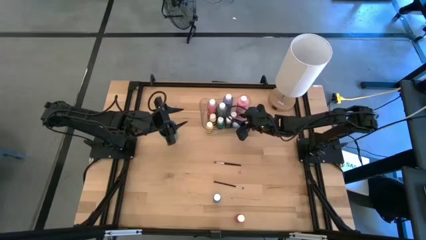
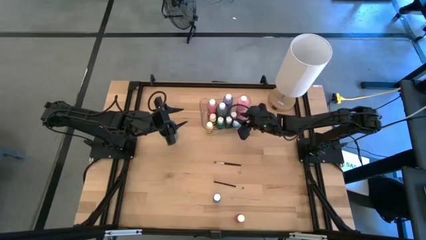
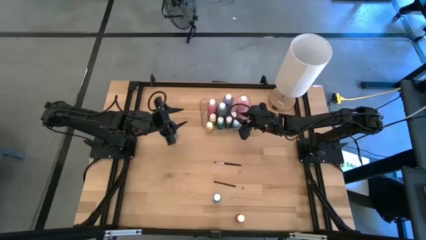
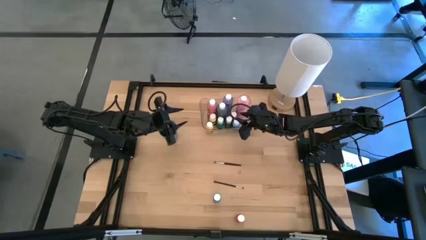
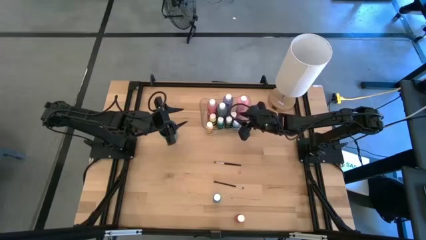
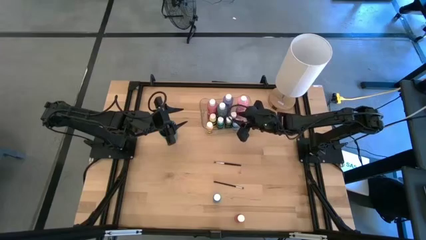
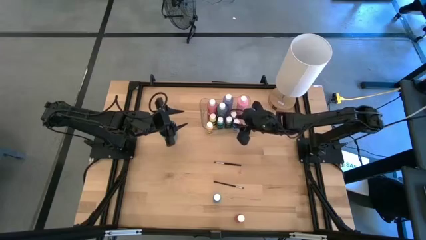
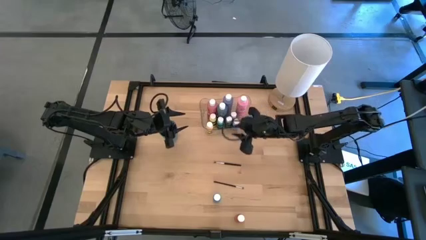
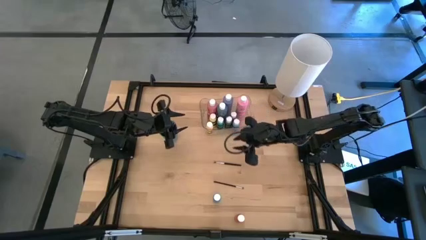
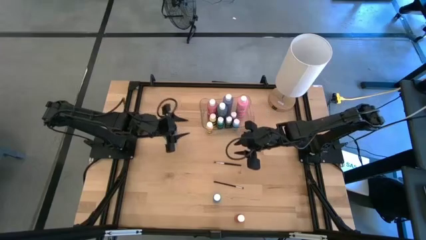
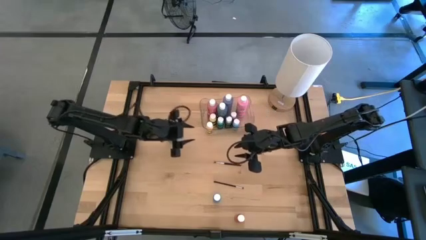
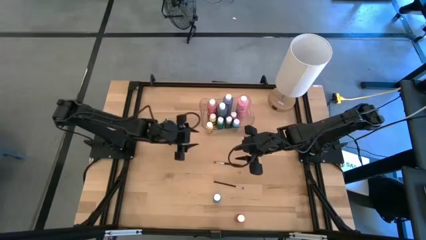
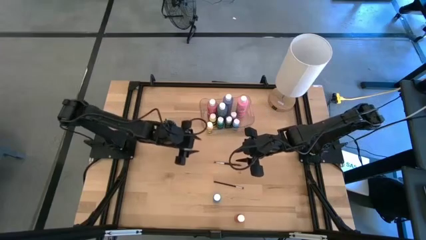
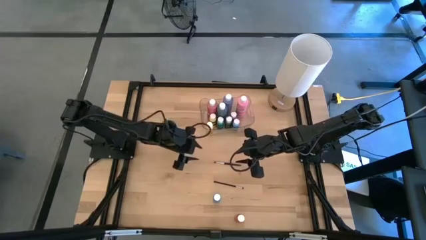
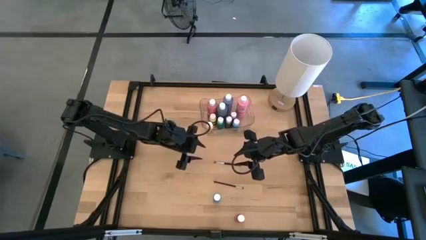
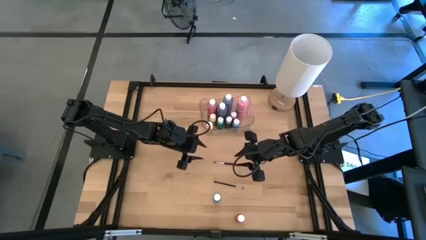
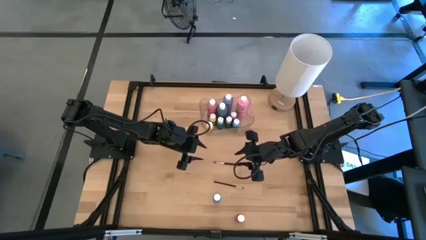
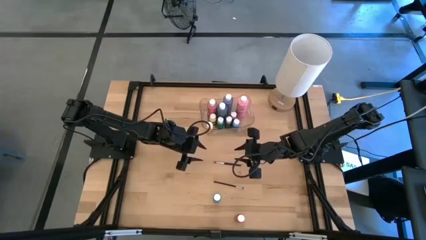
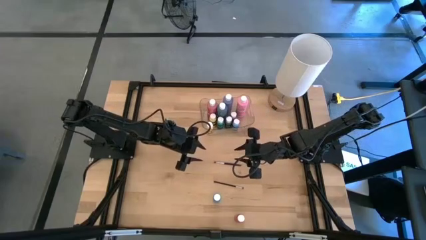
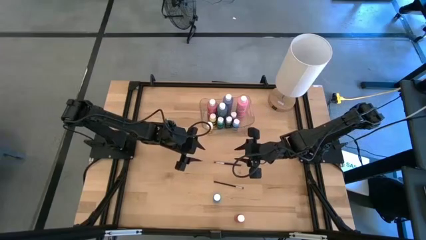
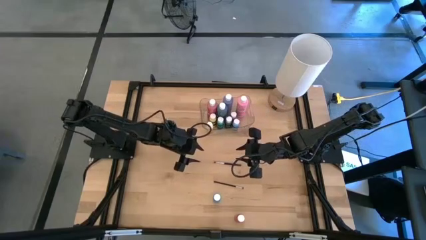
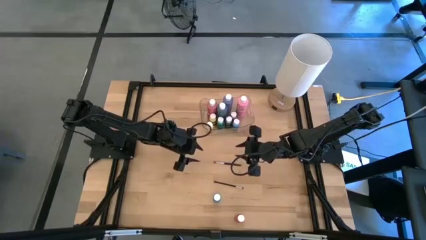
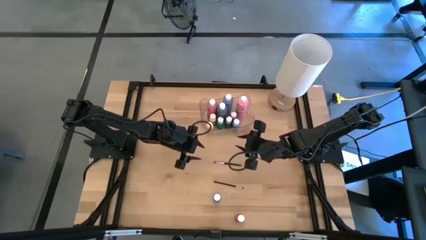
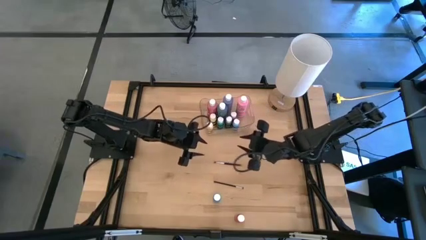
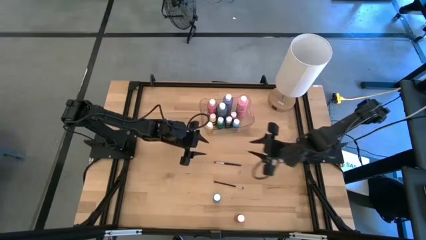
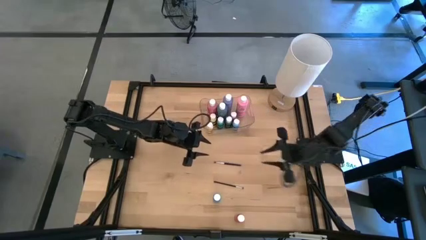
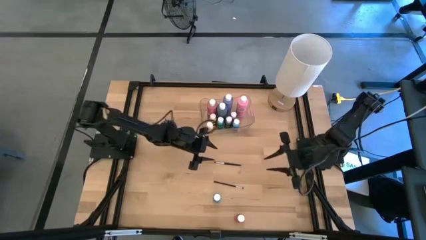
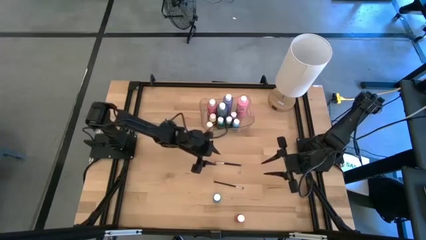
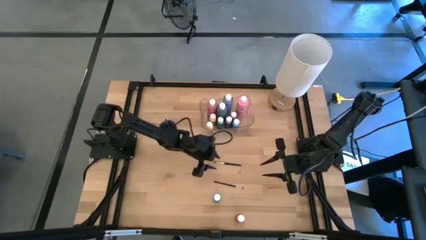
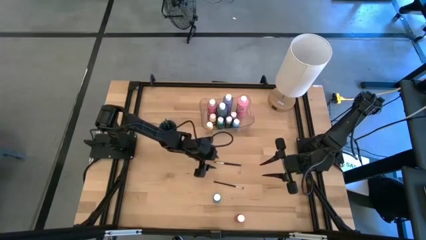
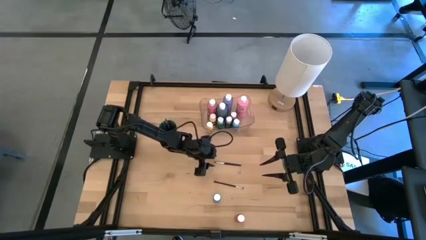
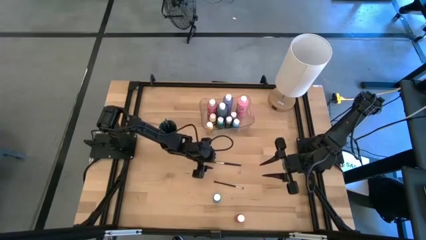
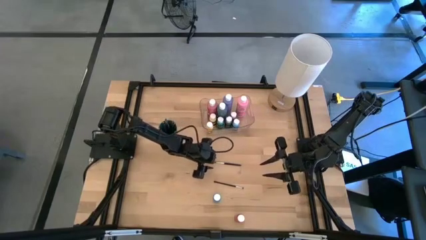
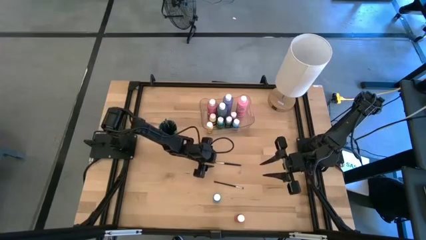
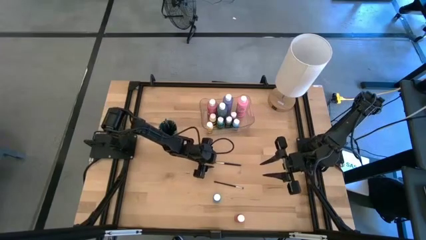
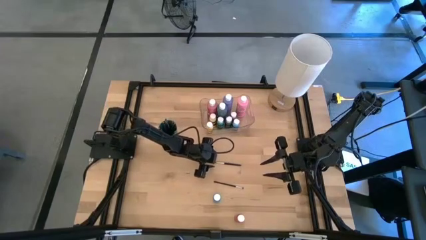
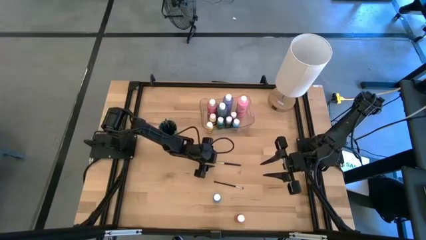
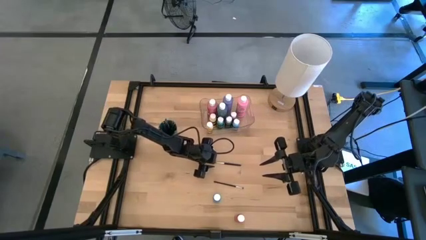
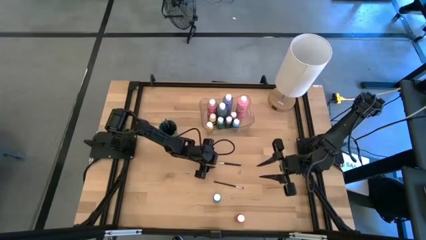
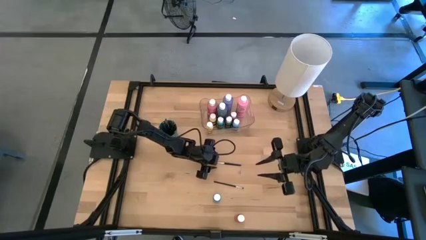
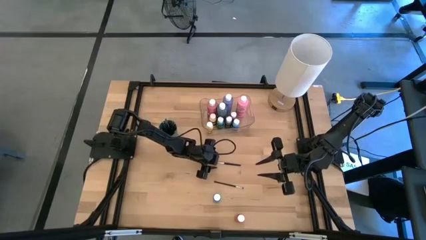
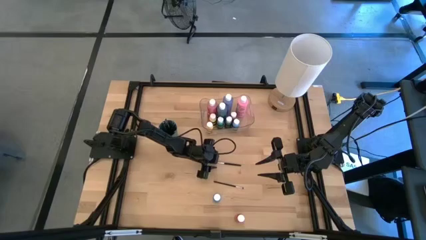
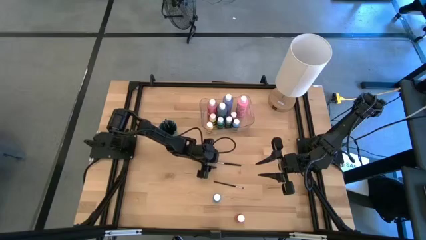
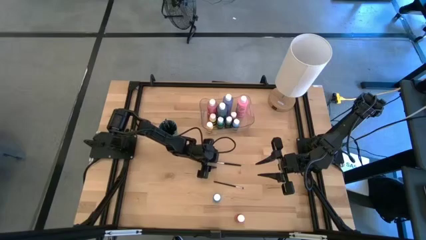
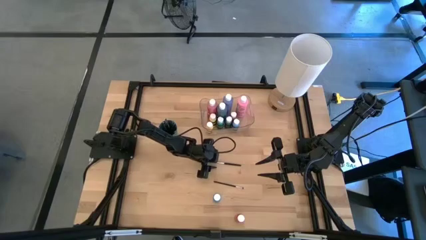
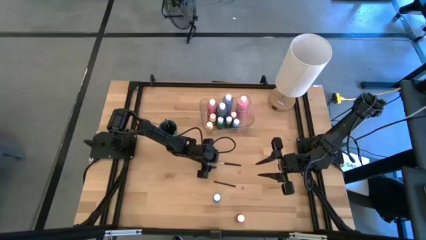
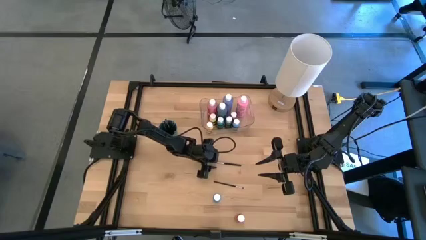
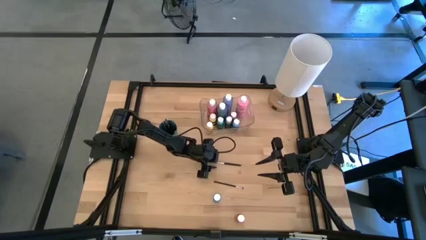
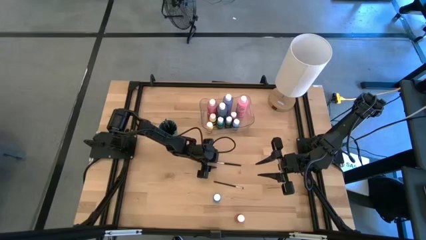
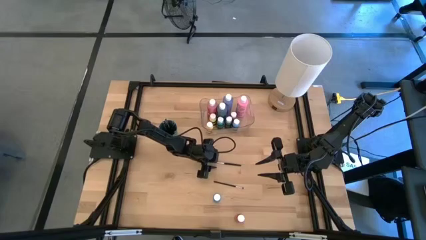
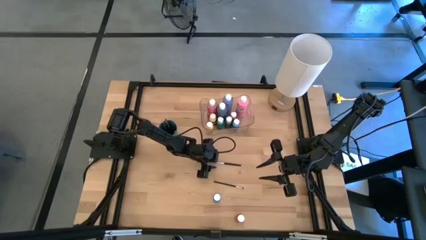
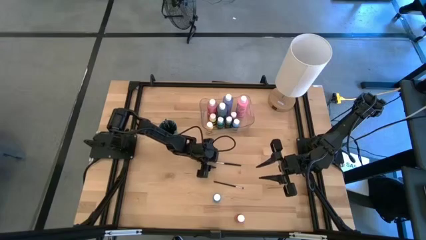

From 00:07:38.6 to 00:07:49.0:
Task: Pick & Place Paint Supplies
Put the black paint brush into the green cup

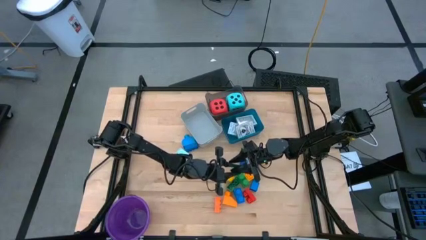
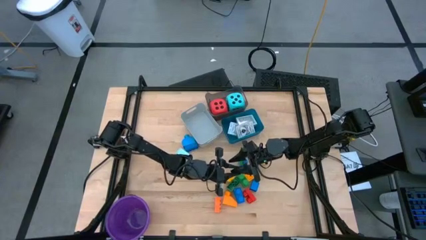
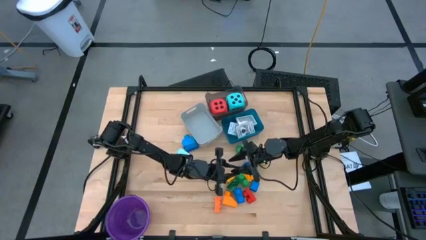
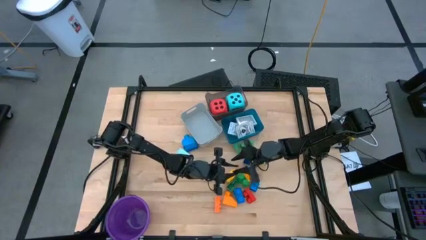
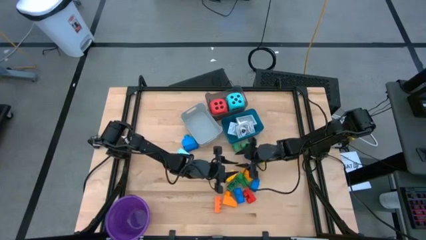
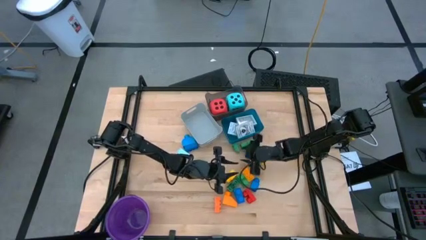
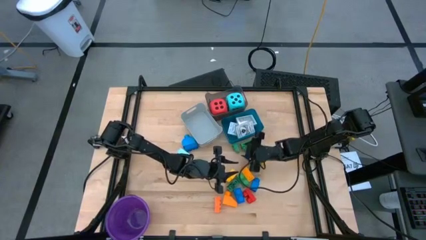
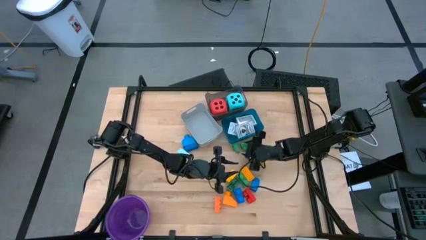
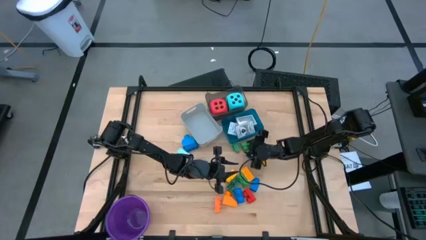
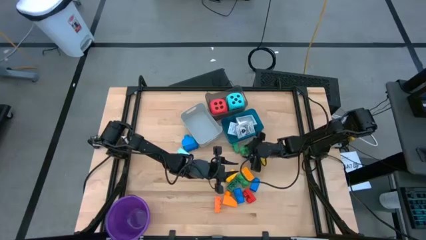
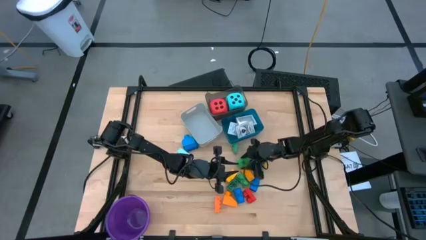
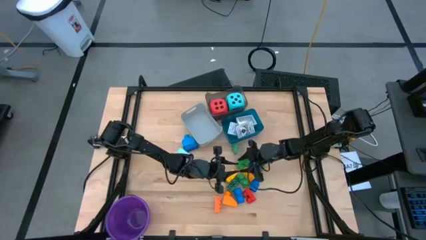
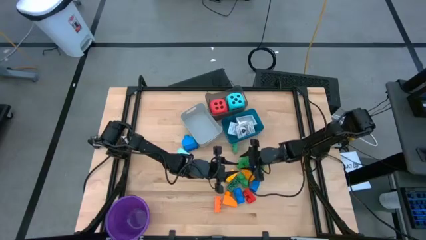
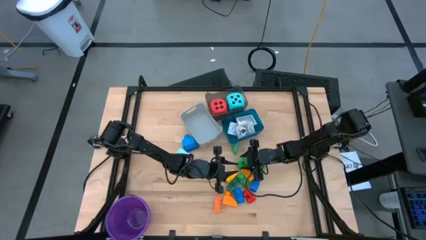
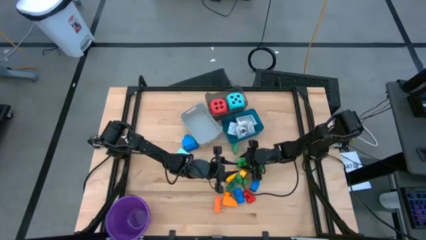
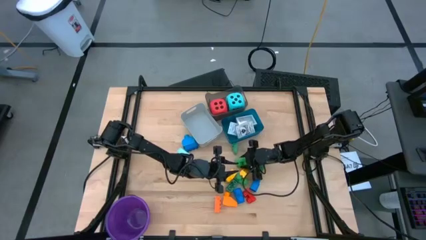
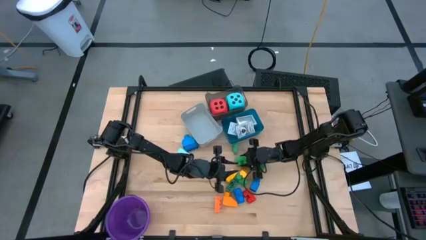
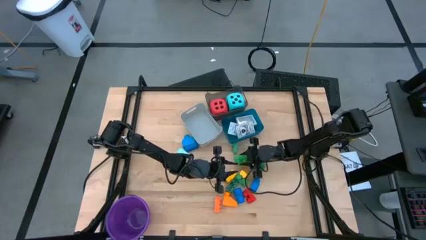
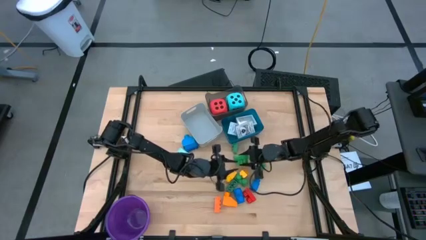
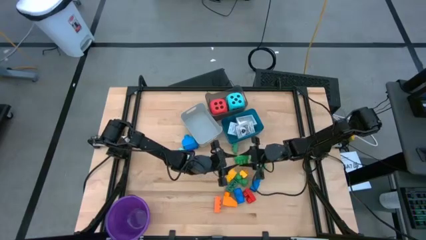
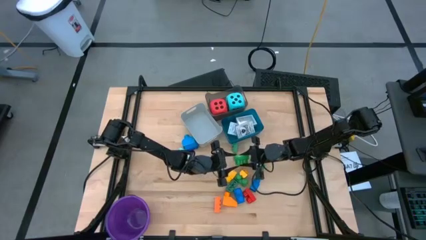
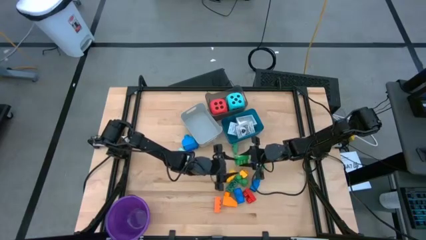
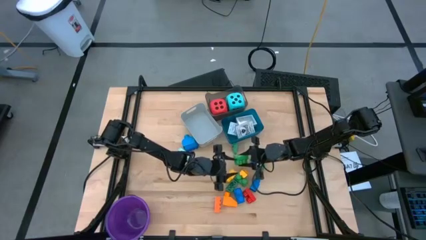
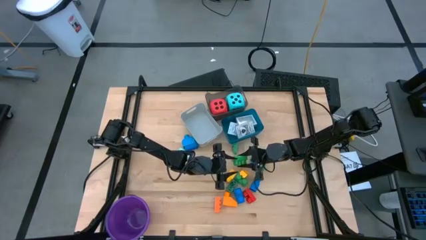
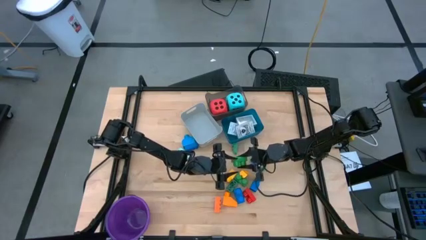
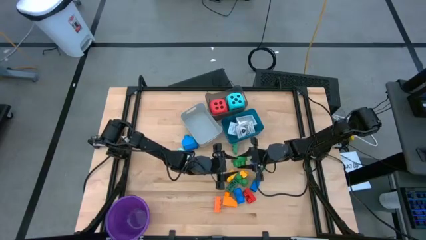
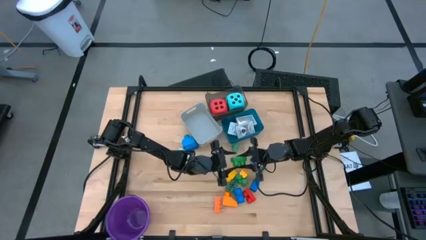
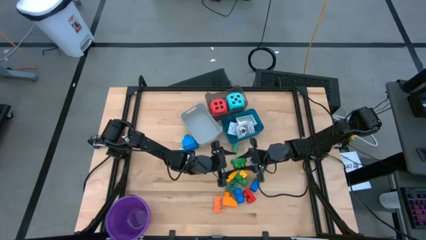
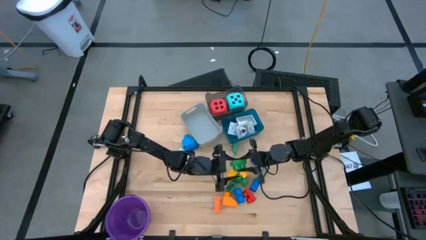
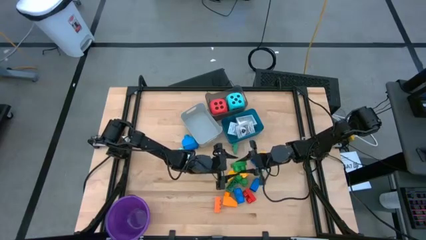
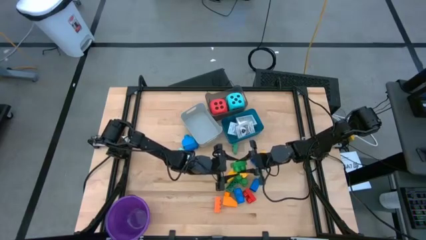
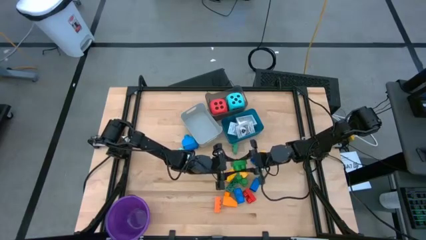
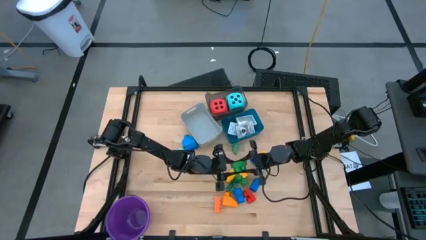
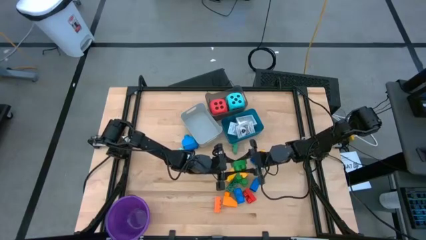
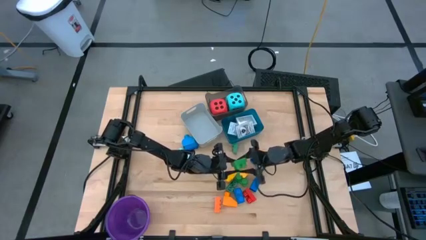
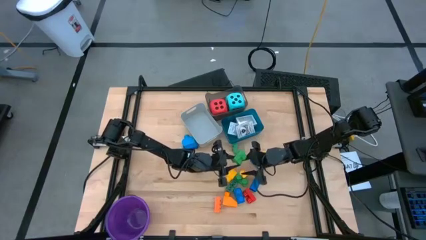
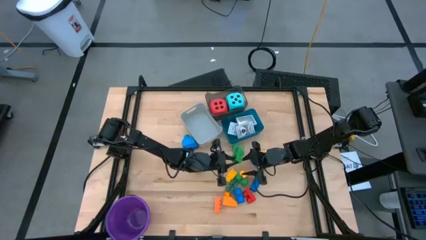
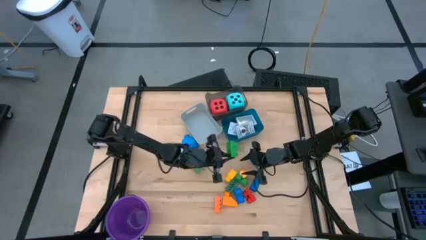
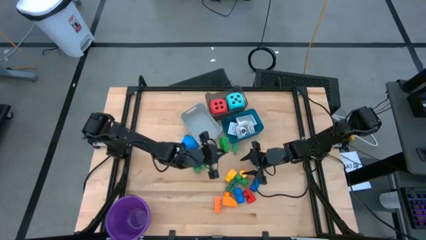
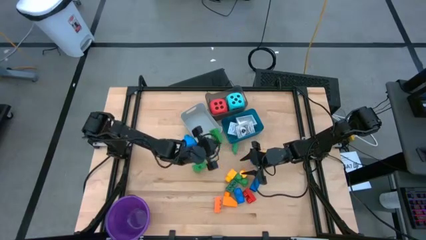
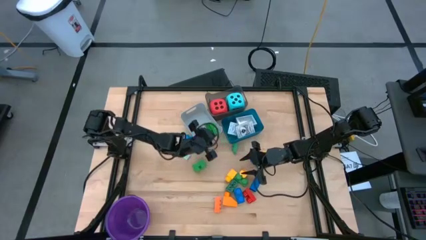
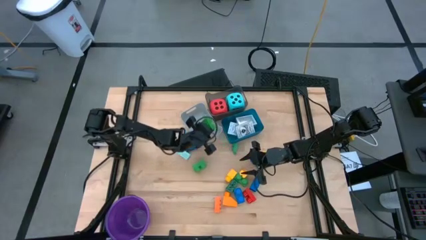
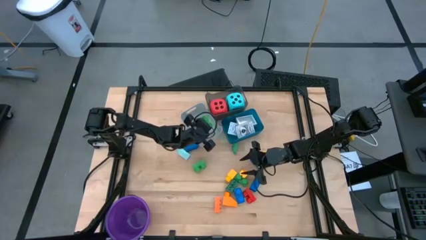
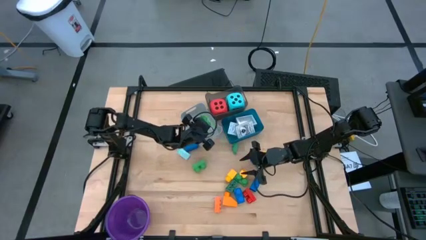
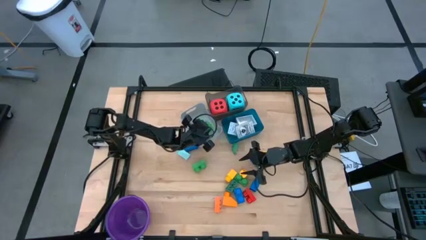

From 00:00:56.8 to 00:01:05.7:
Task: Pick & Place Toys
Put the green game piece into the gray bin
